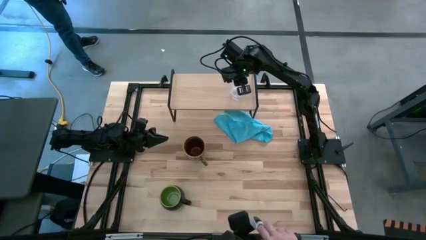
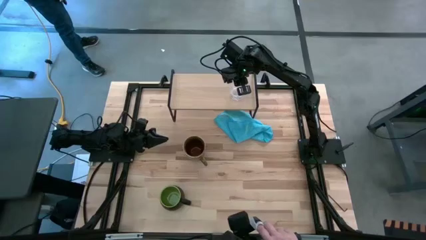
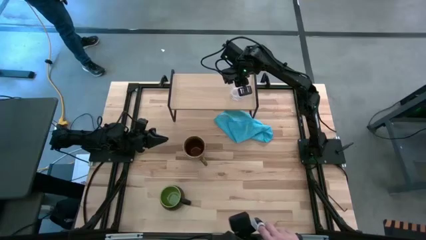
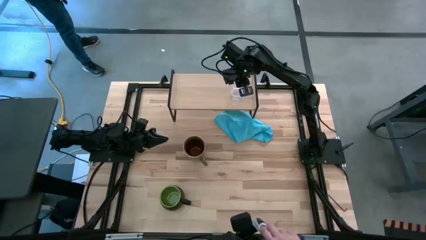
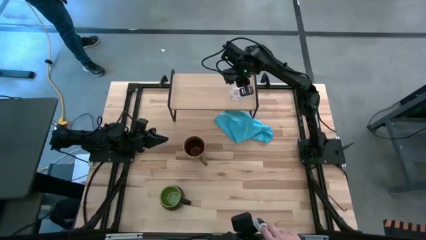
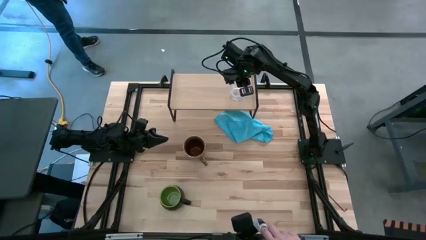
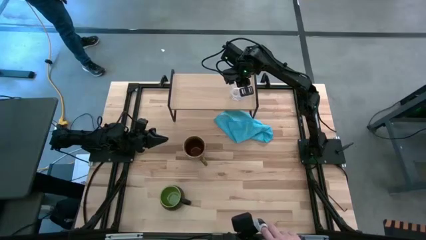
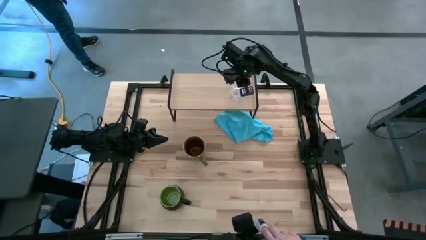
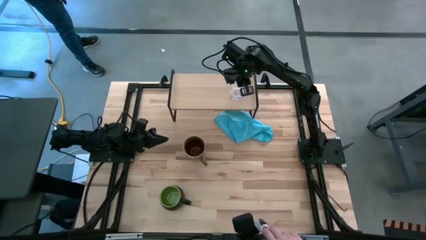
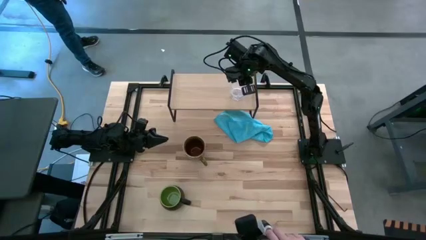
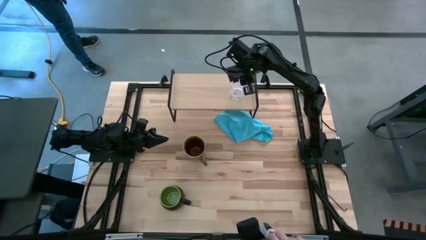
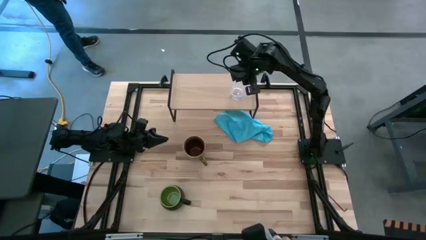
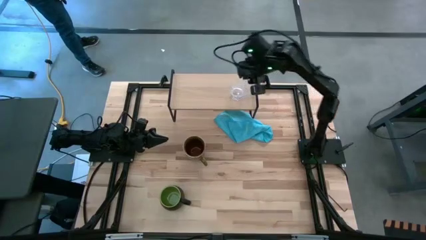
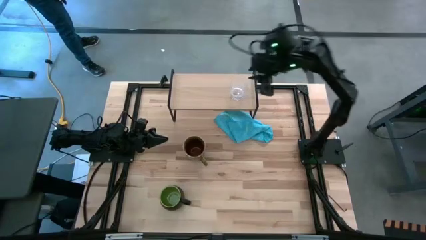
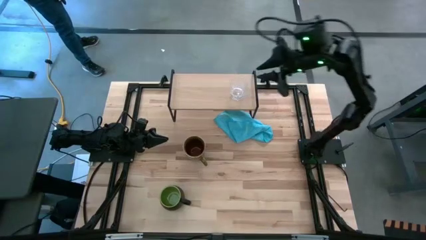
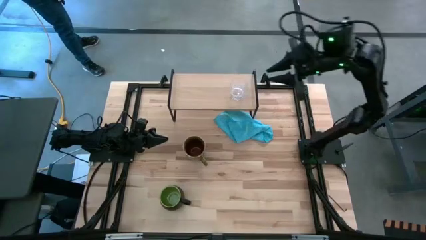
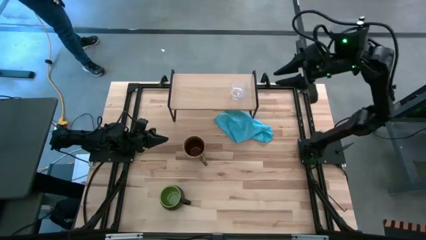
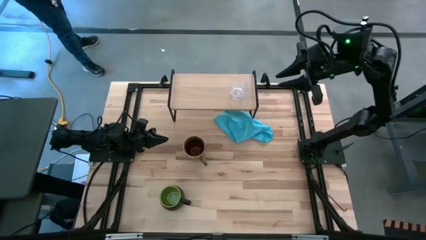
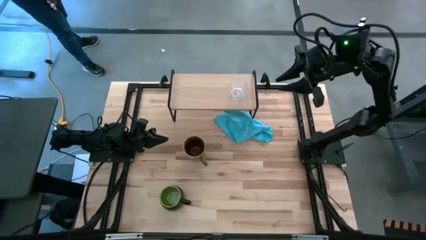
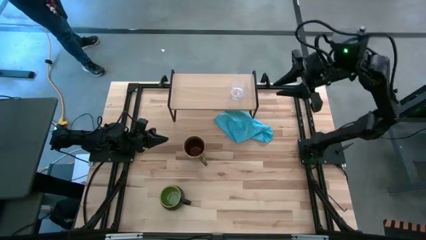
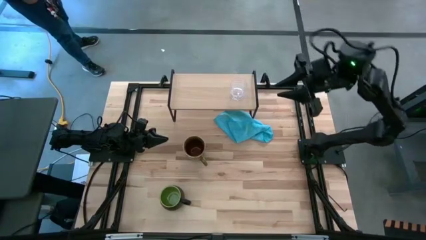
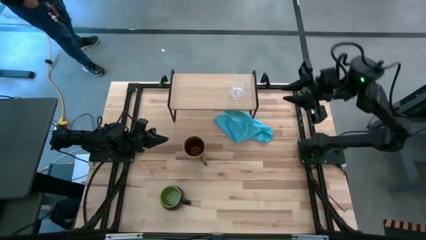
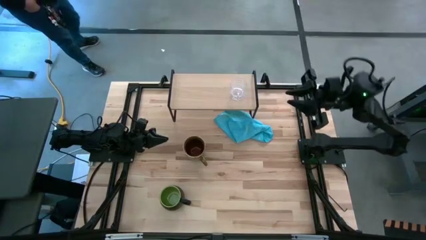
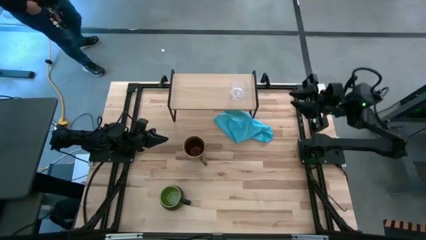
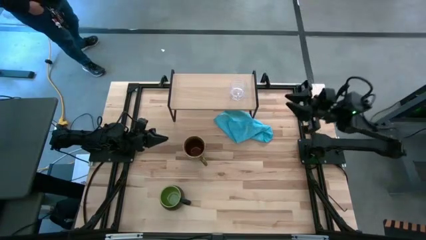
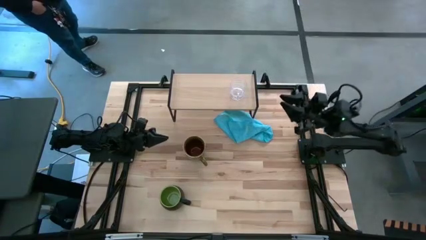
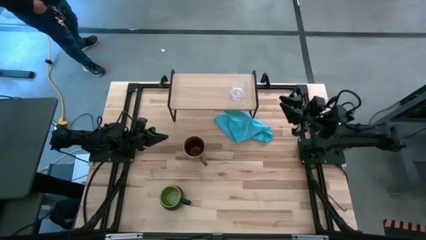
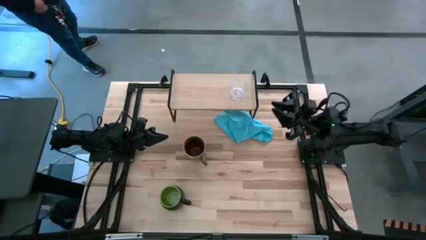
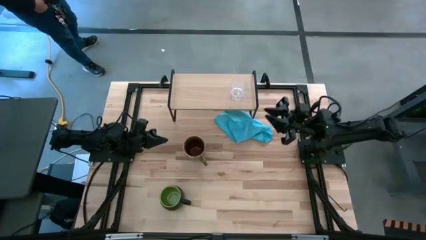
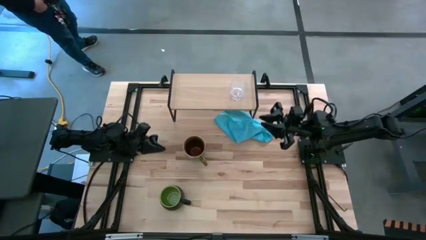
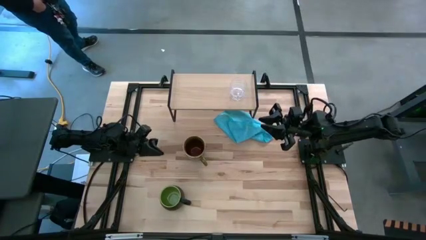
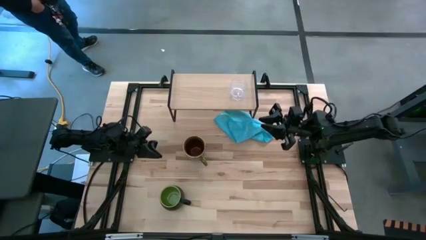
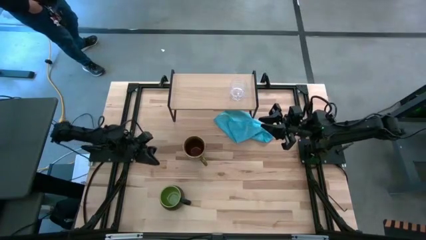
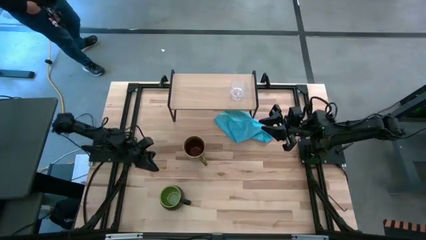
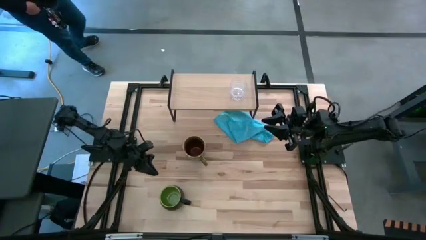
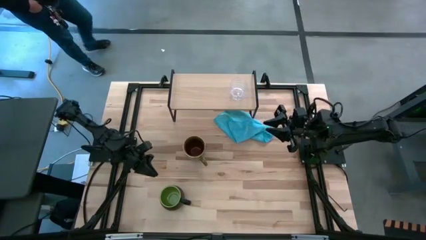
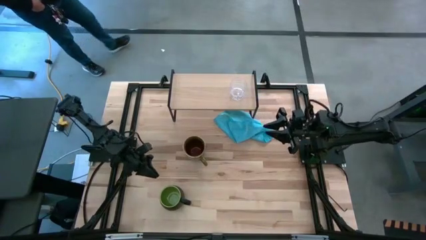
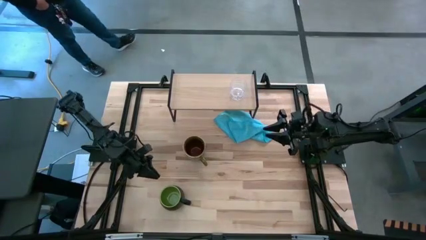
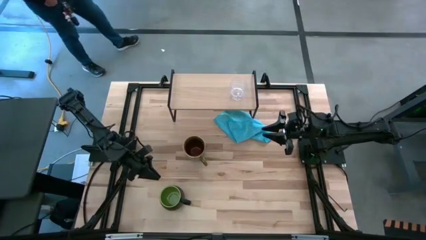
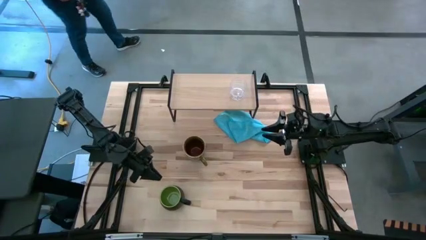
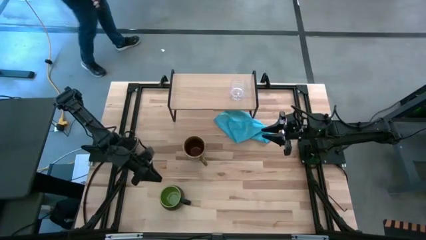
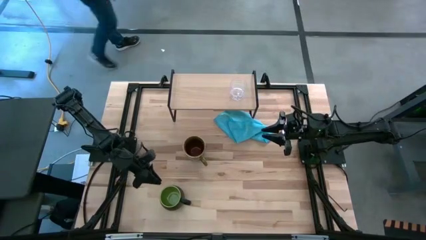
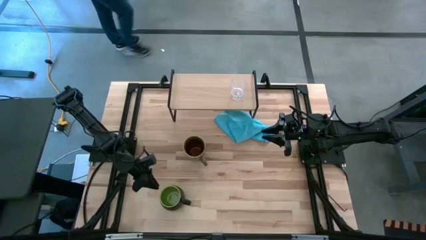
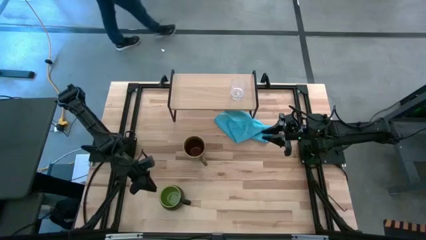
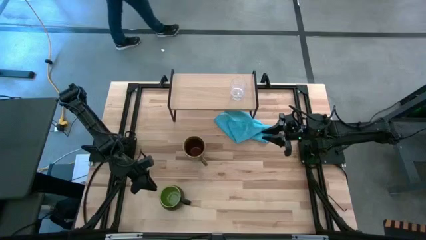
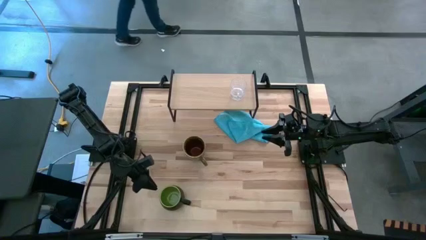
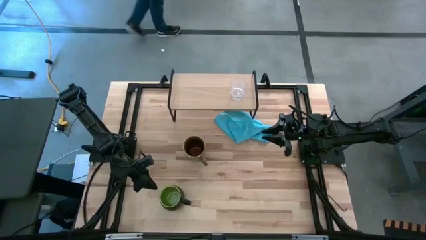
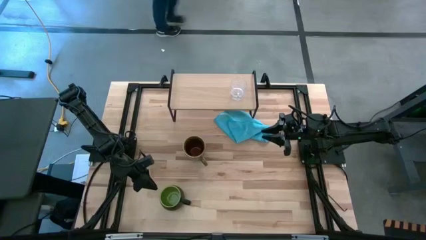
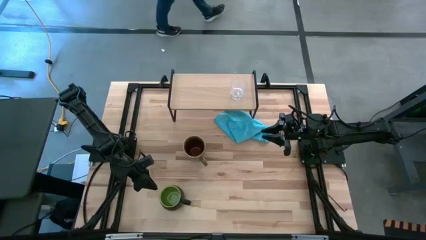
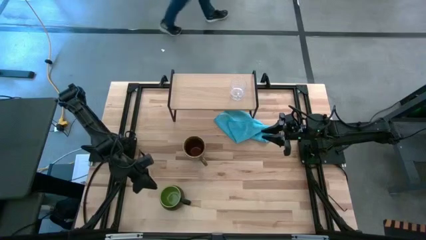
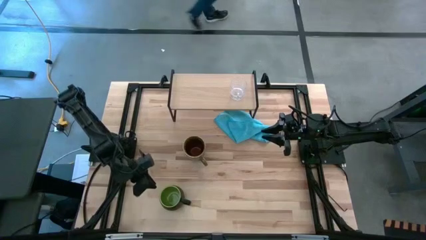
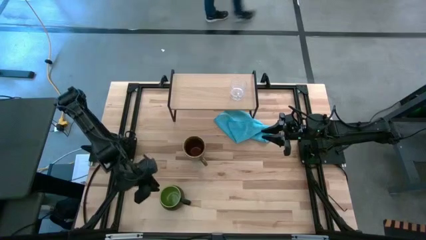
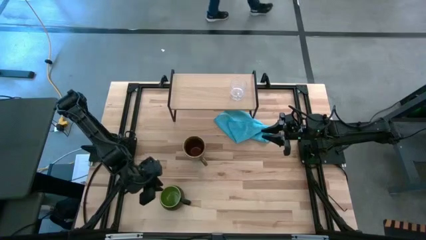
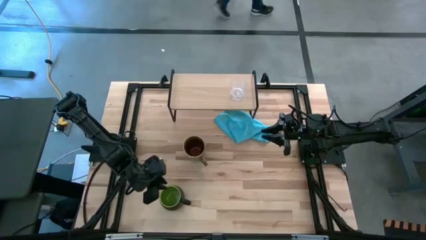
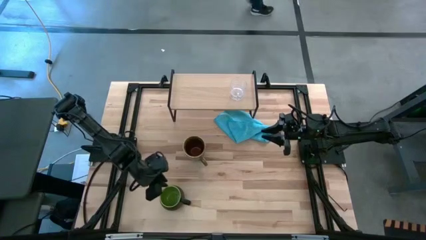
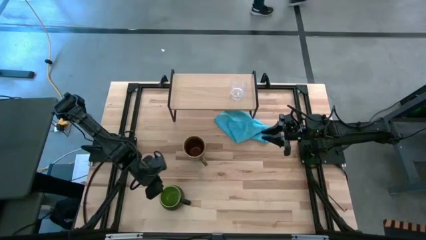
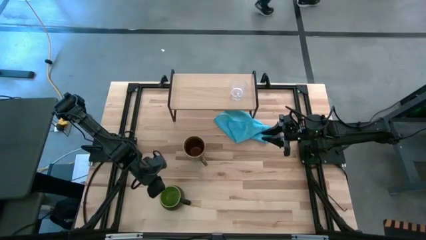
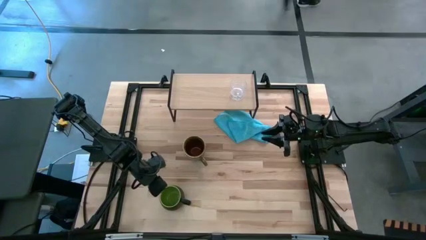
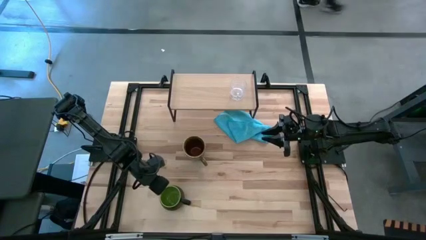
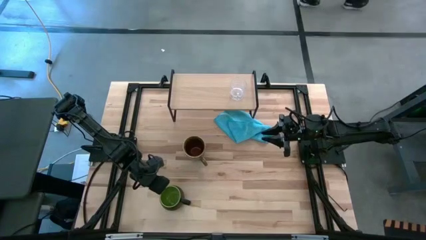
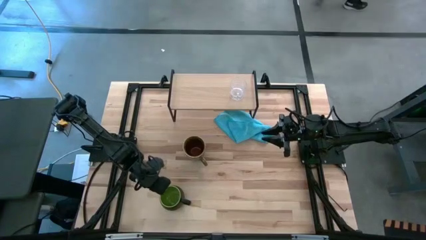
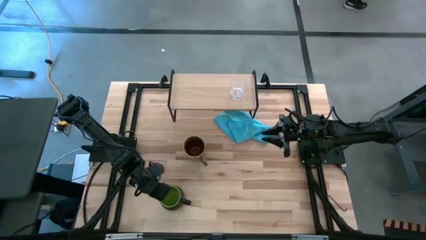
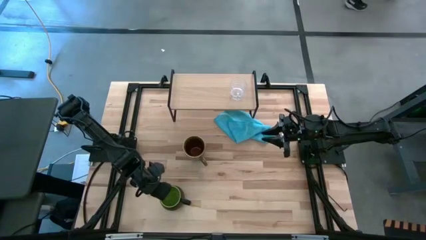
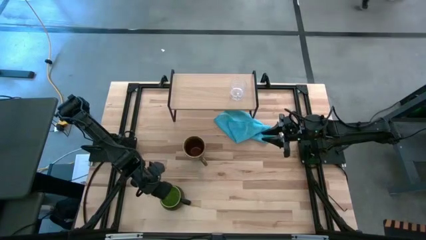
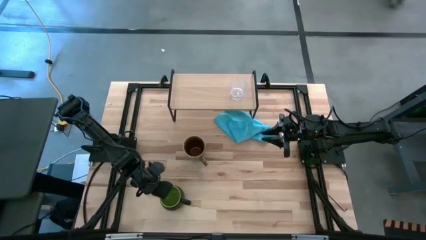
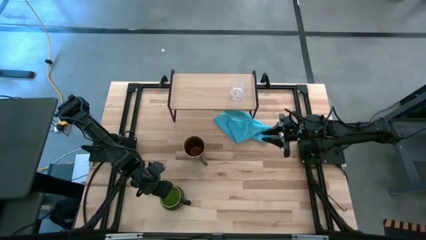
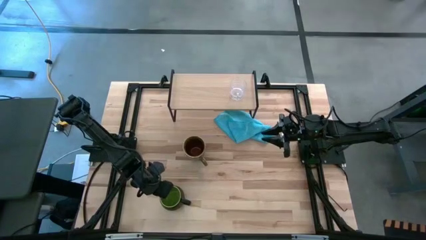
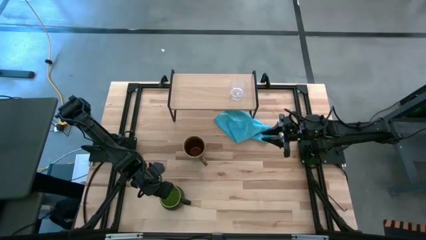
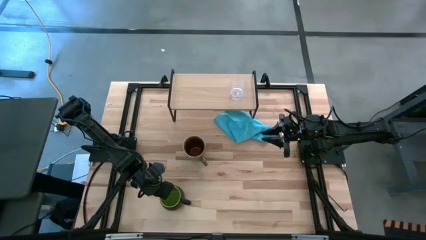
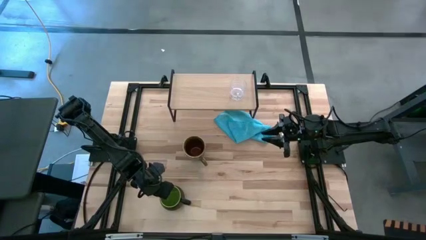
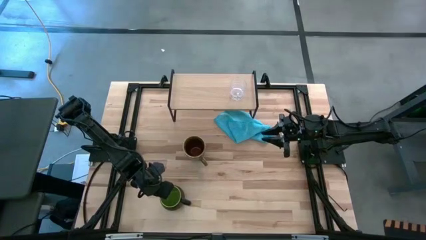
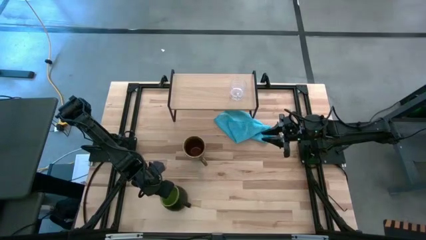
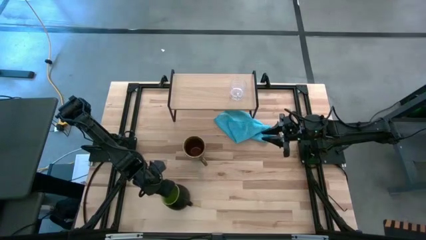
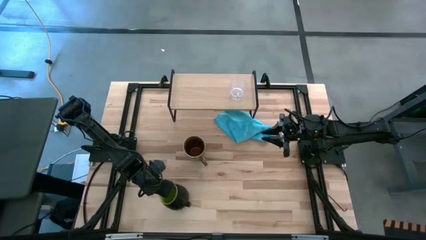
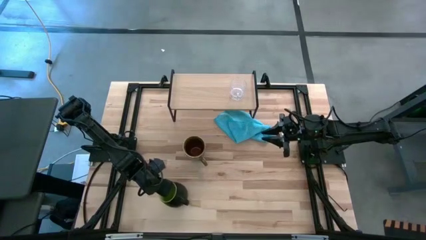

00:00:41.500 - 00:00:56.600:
Task: Stack small to large cups/mugs on shelf
Put the black mug on the shelf

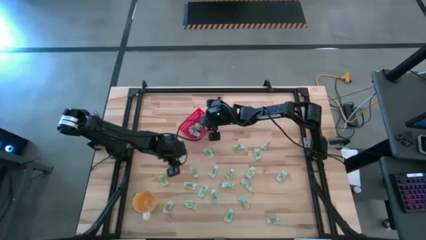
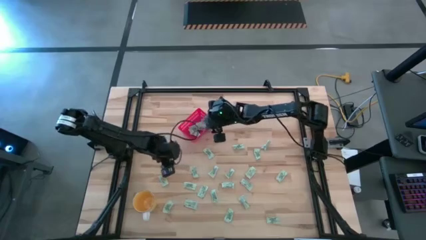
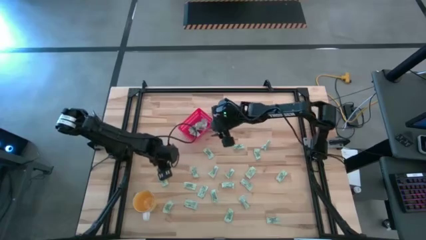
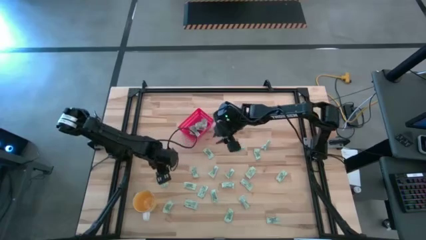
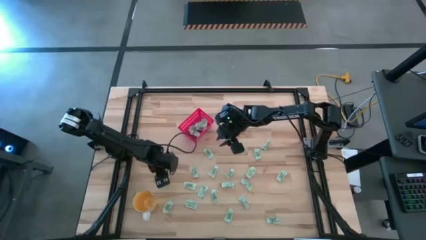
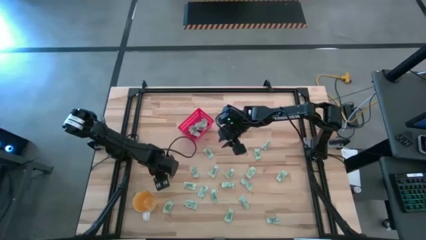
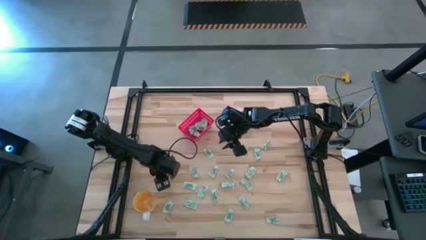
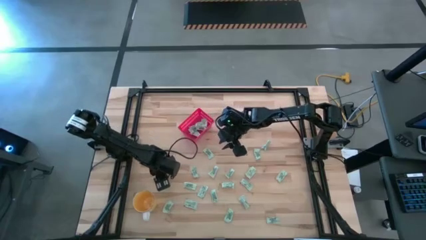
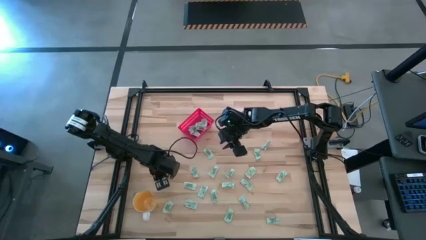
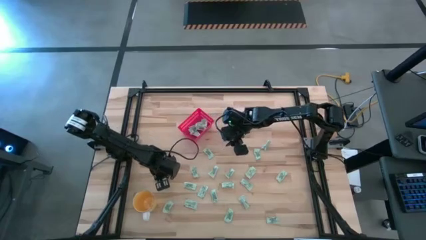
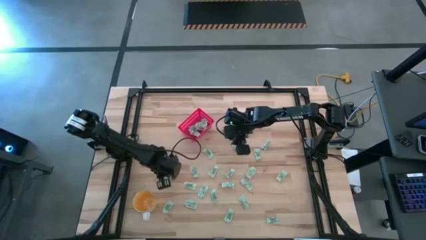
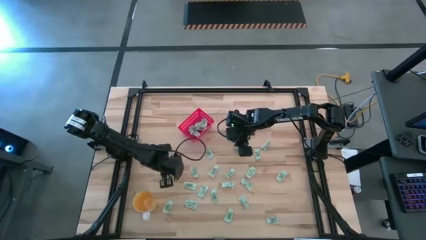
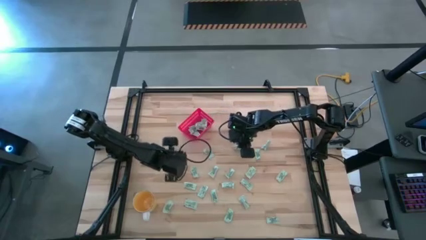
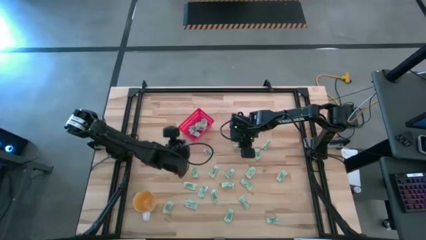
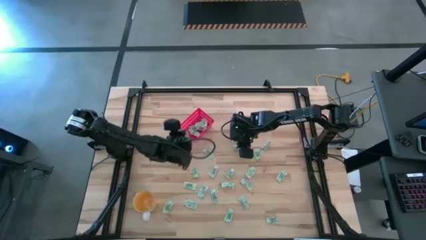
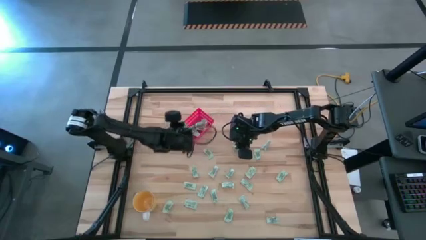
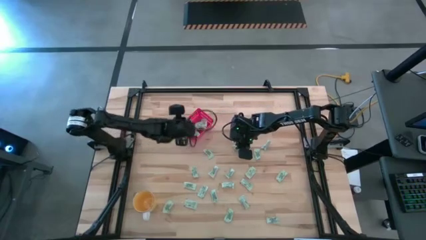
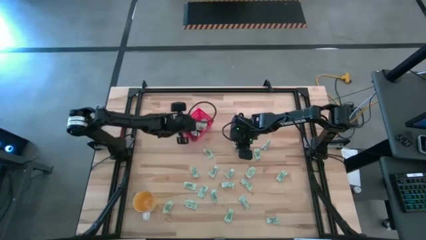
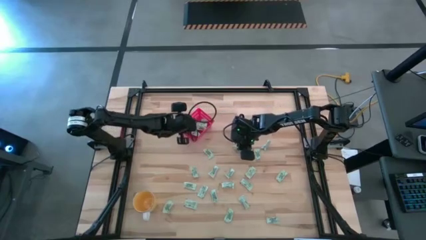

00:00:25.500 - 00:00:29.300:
Task: Pick and place Stevia / Truvia into bins
Put the white stevia packet into the red bin
